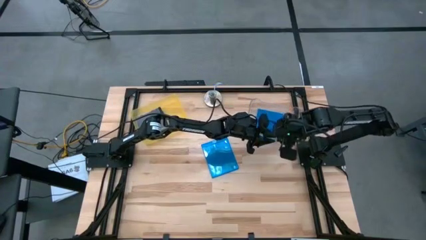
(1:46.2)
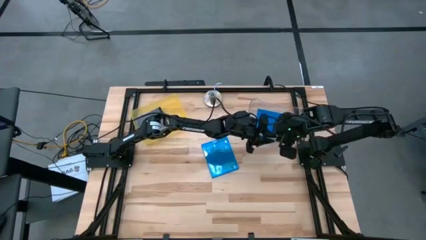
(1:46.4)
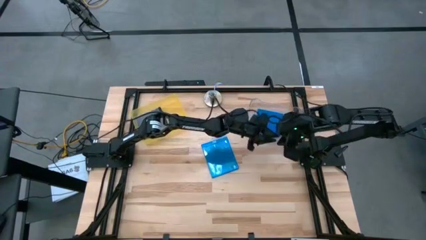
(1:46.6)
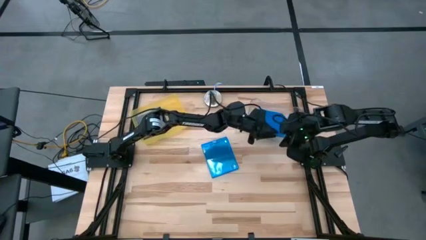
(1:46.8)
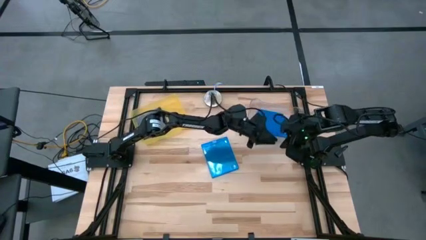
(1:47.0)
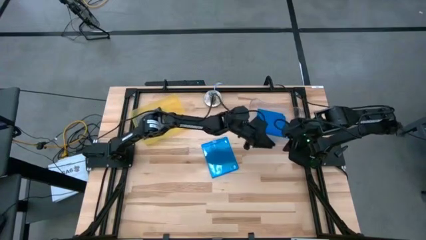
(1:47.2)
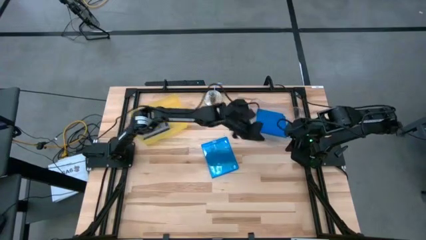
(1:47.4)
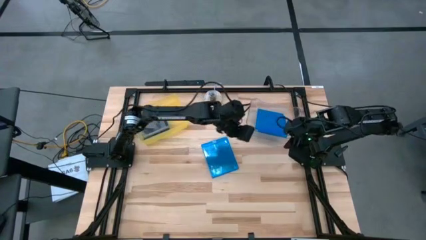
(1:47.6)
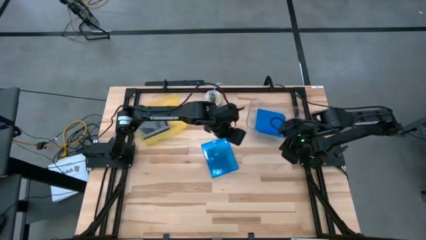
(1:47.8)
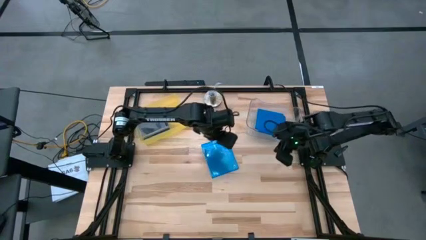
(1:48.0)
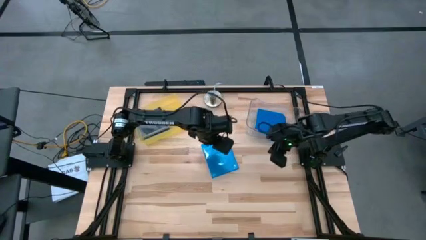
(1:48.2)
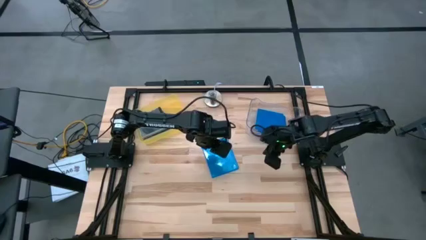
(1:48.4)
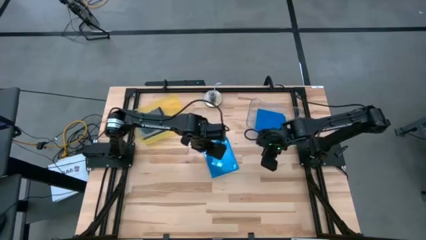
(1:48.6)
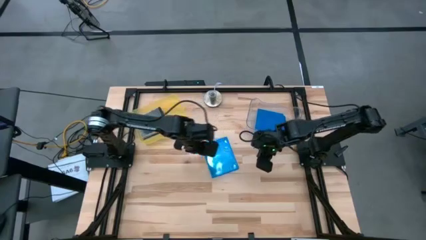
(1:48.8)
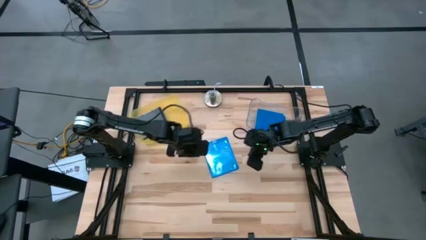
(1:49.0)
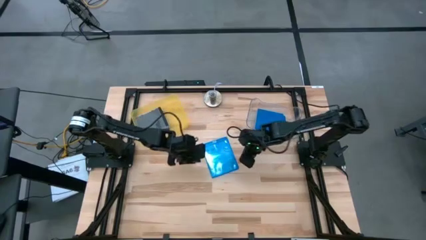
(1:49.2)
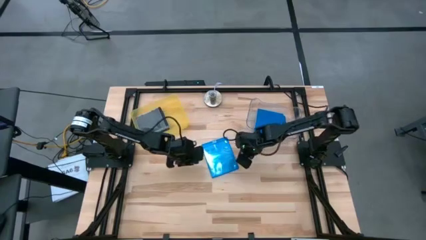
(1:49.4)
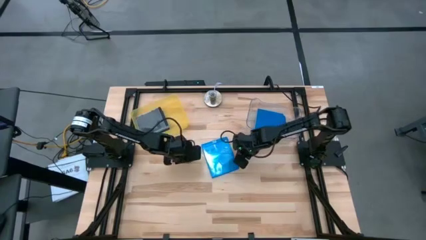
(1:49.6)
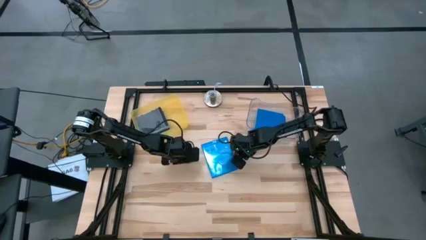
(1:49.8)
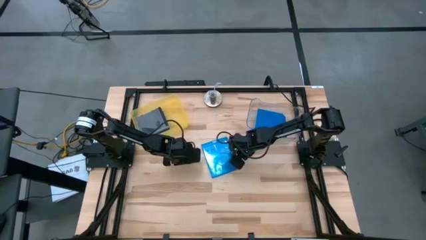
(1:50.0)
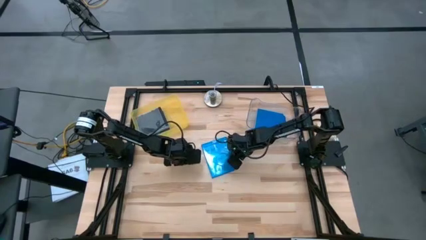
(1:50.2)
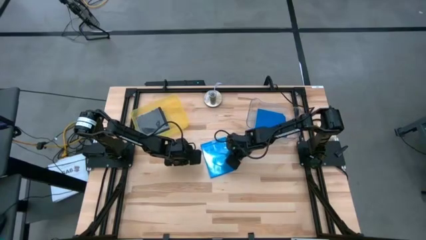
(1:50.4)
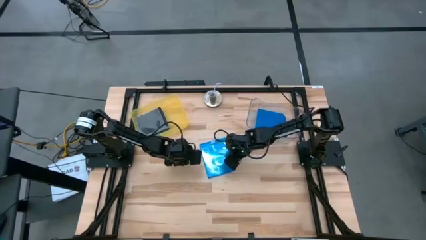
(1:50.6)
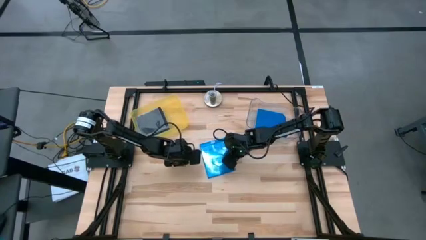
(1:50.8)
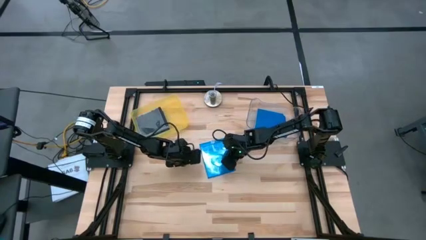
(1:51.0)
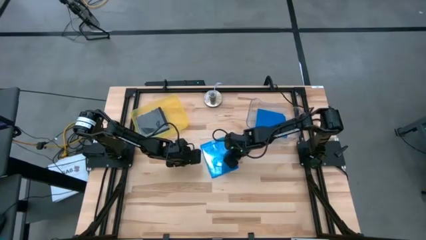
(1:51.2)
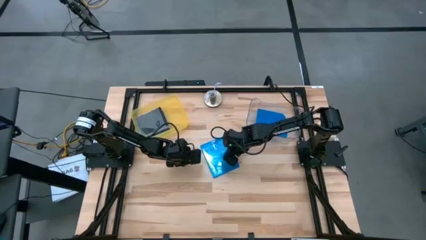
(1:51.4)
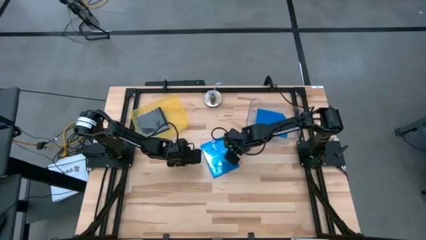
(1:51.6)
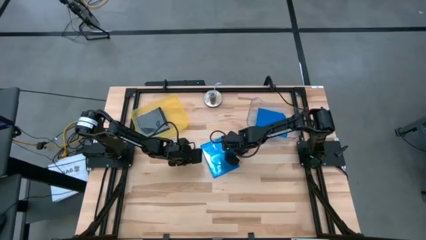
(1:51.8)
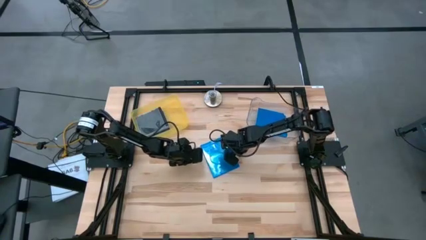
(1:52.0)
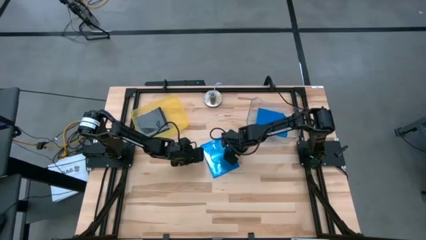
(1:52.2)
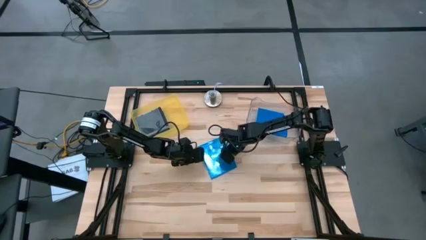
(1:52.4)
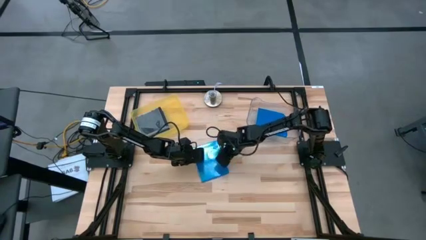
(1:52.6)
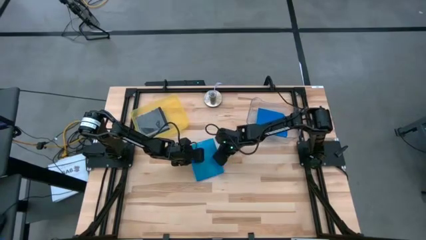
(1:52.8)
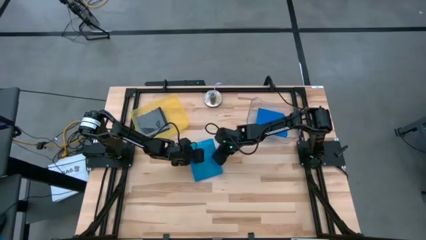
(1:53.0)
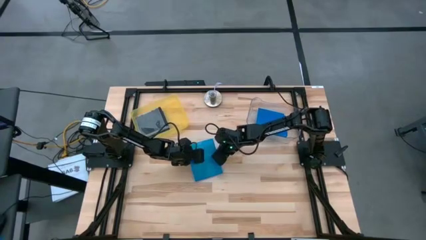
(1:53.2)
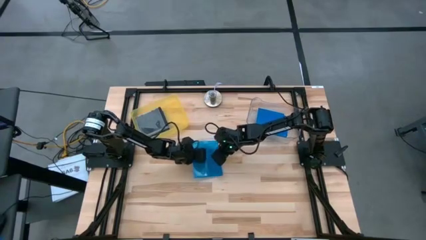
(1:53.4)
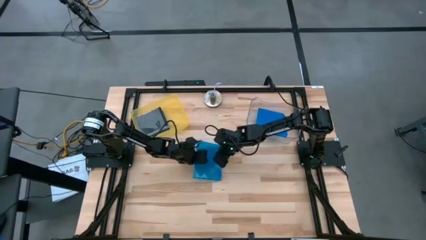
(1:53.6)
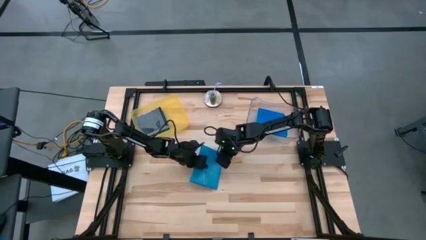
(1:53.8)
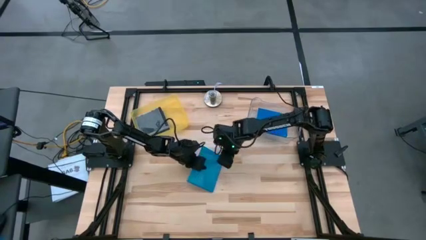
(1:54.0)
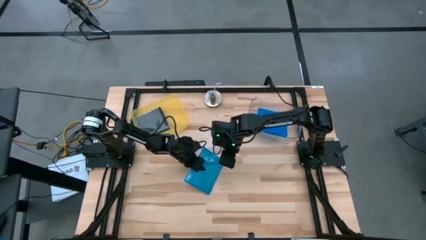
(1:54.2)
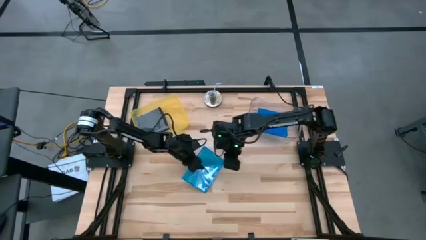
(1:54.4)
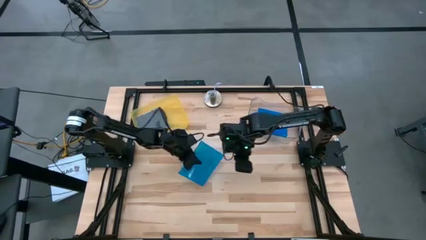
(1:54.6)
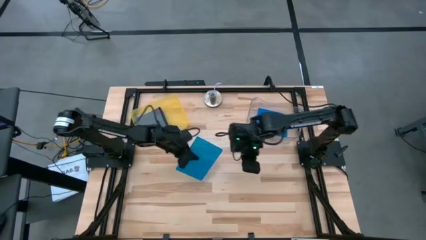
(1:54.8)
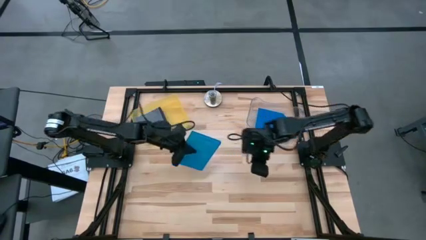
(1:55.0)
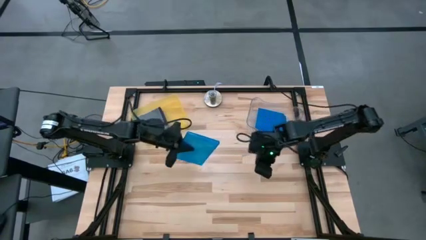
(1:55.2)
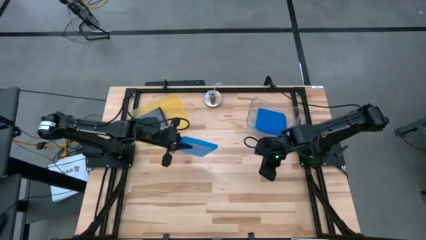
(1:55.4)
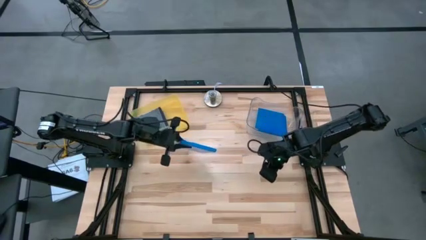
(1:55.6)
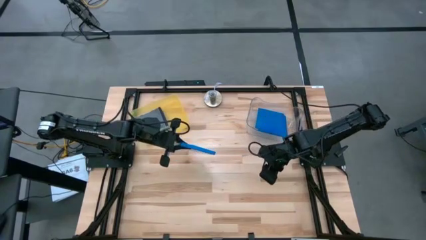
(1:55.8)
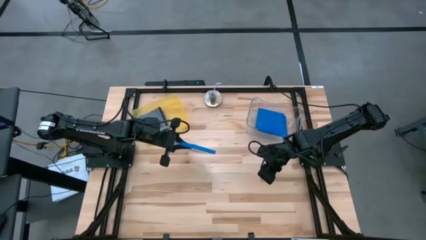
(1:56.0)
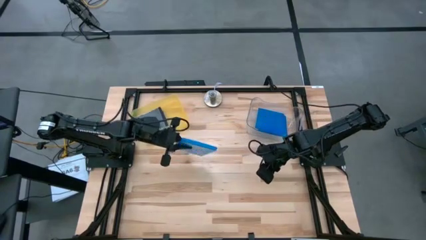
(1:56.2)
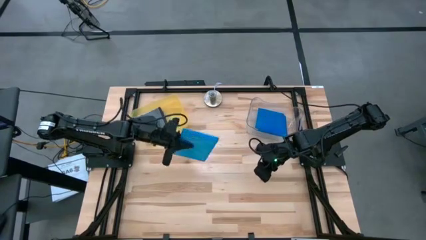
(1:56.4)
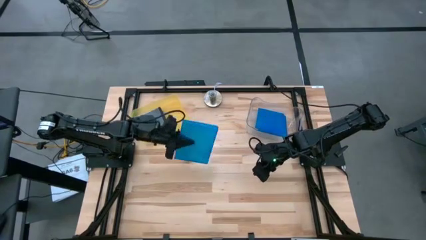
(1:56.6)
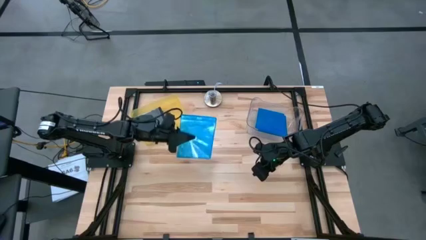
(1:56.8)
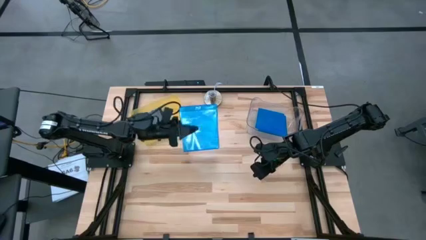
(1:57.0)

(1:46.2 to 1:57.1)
Task: Pick & place jewel cases by type
Put the blue CD case into the transparent bin

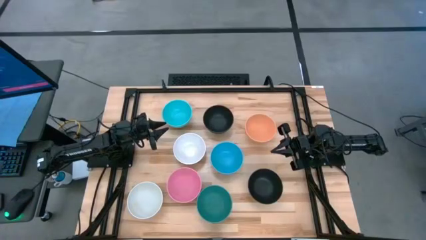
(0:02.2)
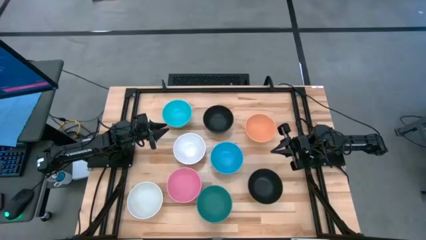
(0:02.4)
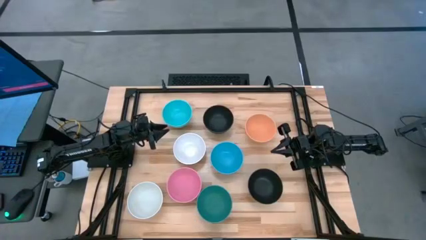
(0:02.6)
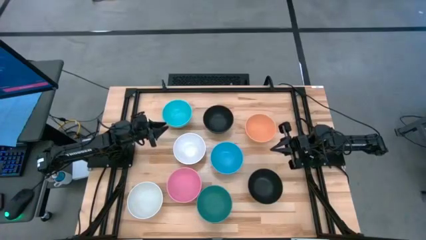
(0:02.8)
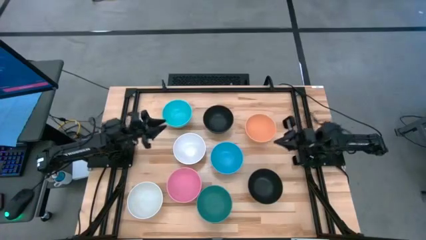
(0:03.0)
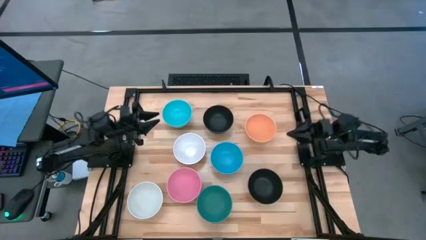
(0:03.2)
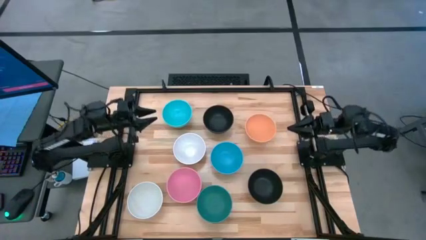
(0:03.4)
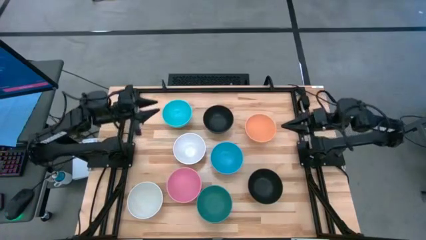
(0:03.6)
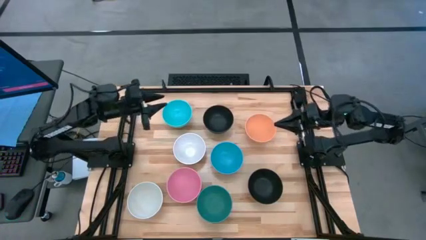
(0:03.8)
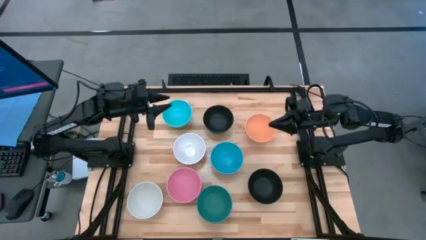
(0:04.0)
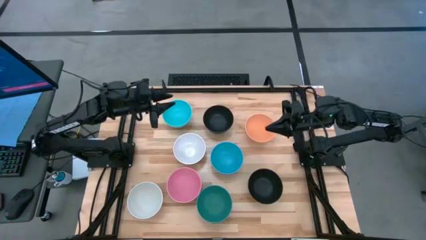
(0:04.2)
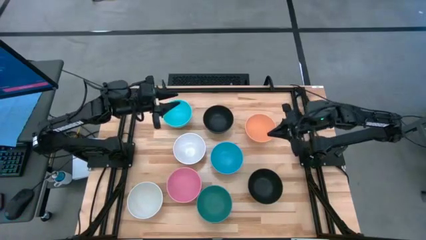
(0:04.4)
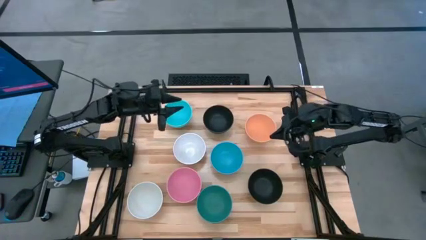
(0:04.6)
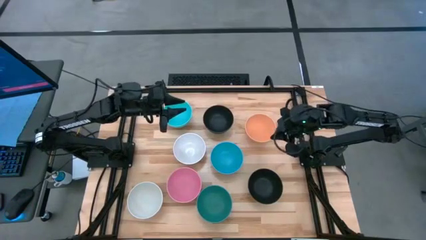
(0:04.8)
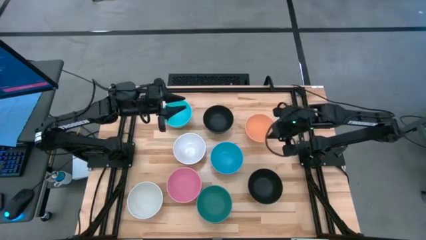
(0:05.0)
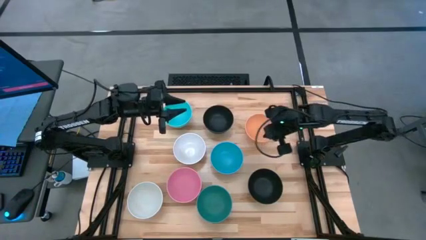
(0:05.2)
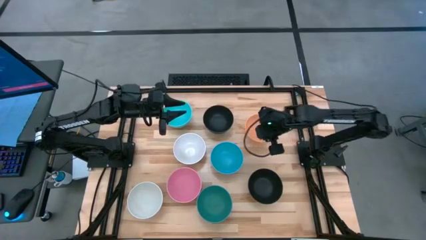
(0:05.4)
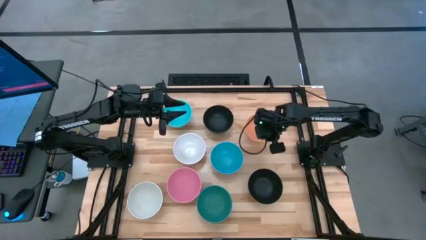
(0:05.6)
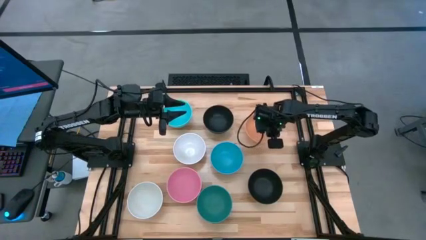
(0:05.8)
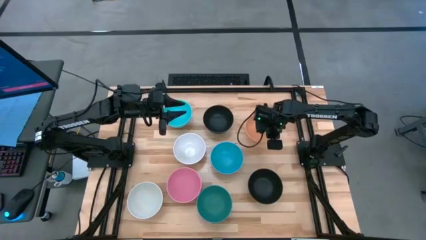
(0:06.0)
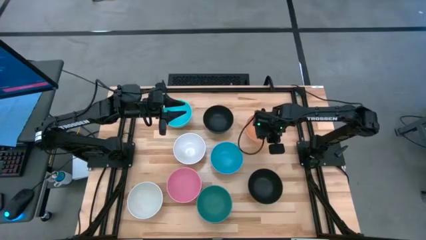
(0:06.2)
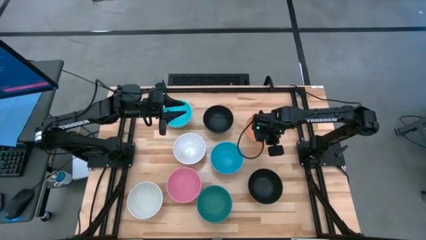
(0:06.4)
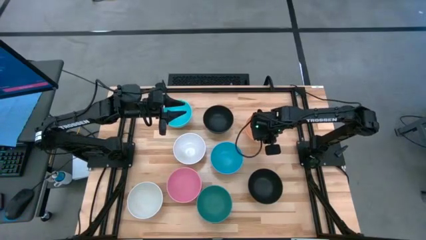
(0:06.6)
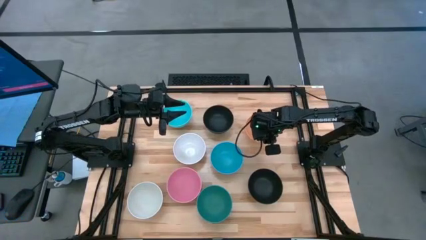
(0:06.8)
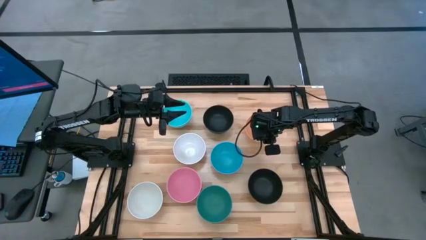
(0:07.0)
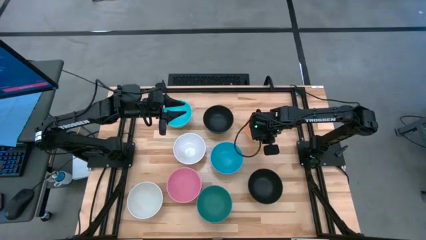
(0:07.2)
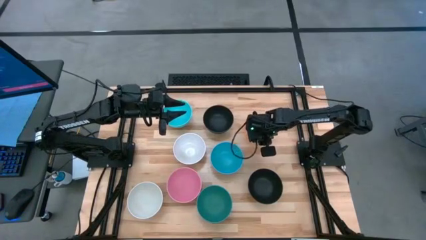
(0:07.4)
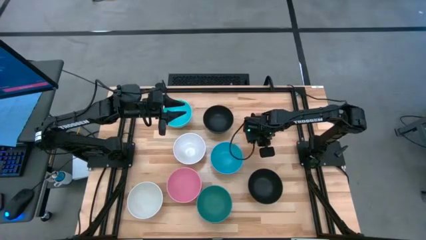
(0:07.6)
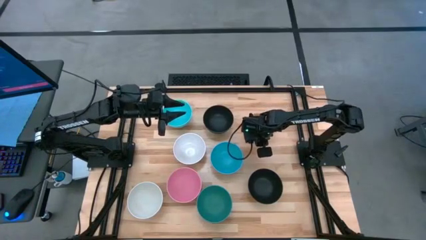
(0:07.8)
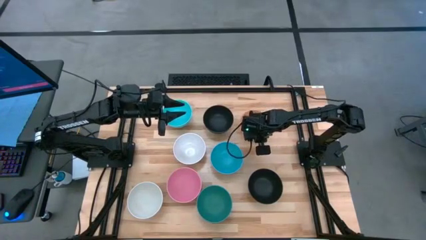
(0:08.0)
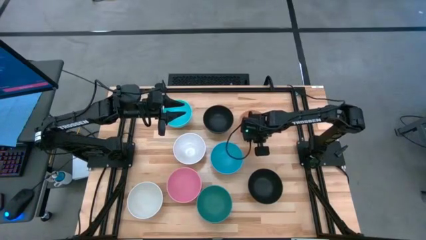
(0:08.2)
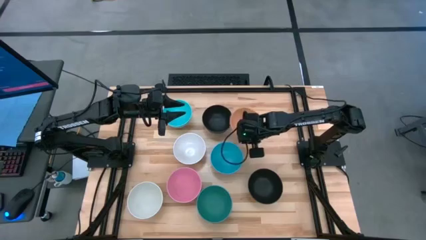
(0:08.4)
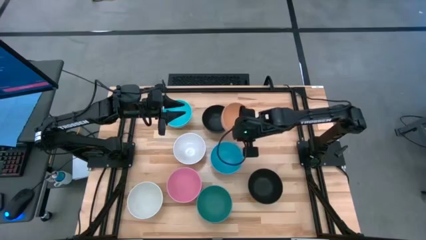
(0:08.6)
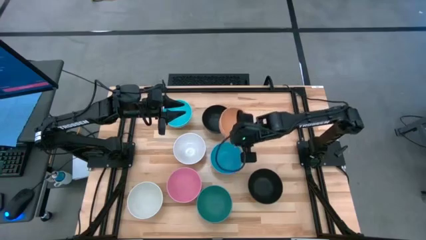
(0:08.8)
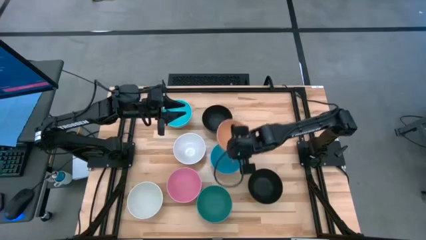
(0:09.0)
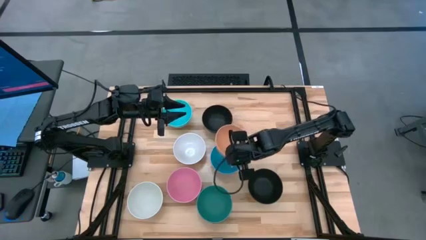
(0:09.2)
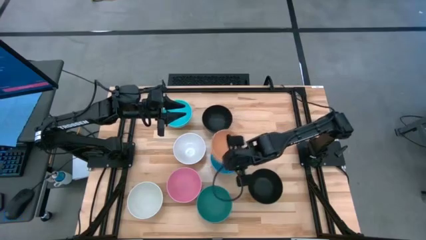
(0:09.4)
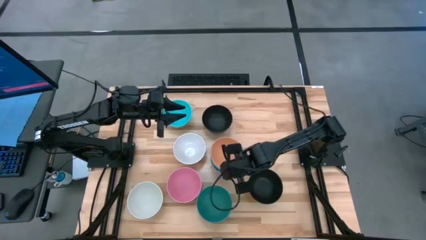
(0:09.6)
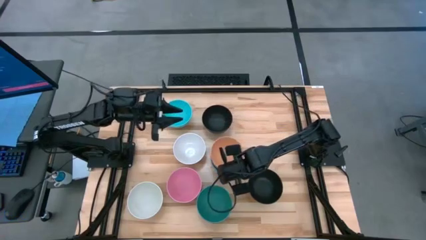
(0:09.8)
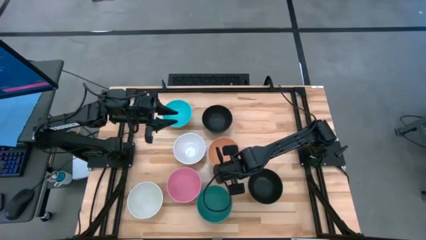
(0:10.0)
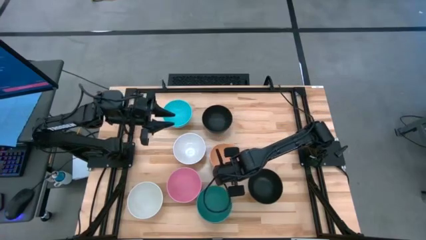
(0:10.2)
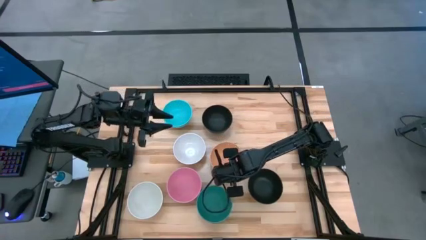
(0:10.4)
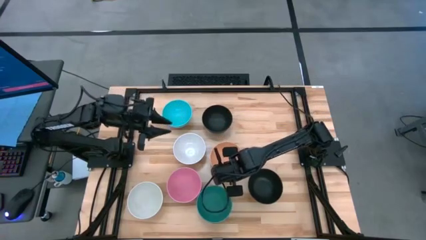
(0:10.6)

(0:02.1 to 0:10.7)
Task: Nest bowls inside each other
Stack the orange bowl on top of the blue bowl
